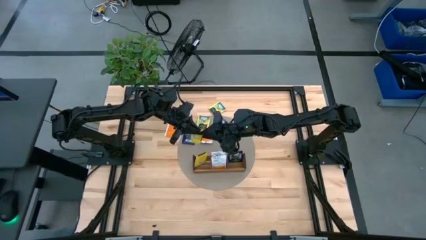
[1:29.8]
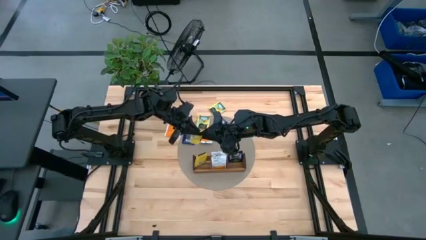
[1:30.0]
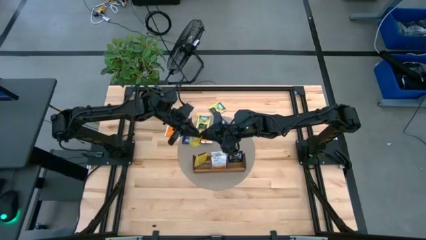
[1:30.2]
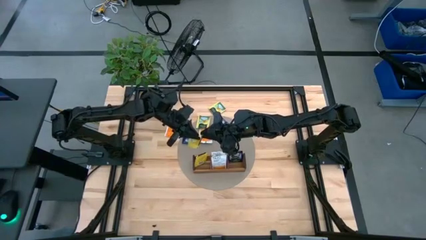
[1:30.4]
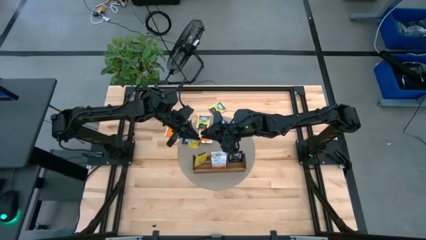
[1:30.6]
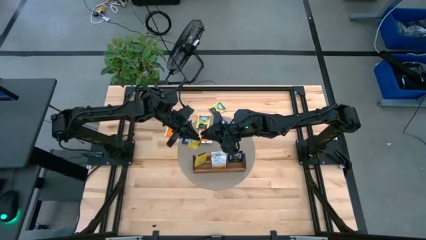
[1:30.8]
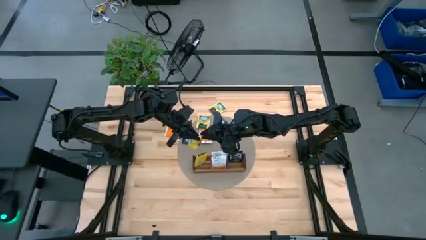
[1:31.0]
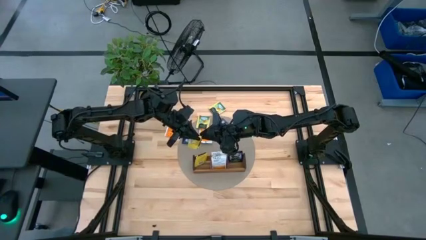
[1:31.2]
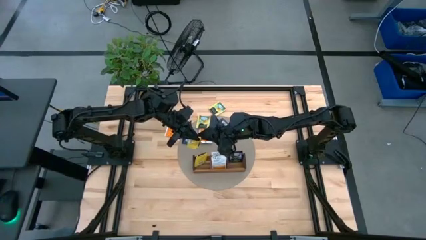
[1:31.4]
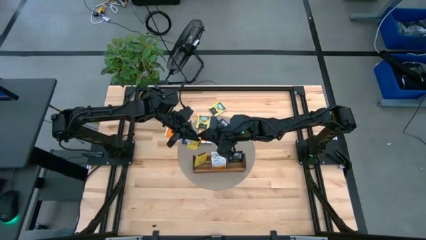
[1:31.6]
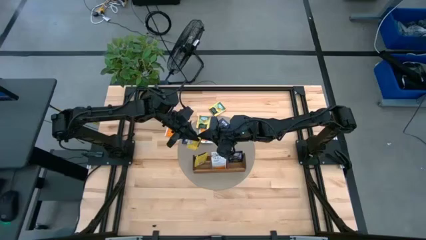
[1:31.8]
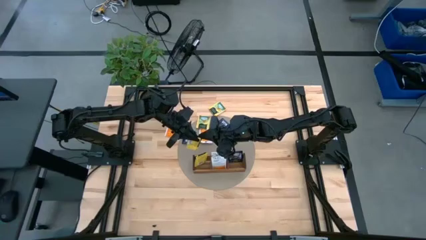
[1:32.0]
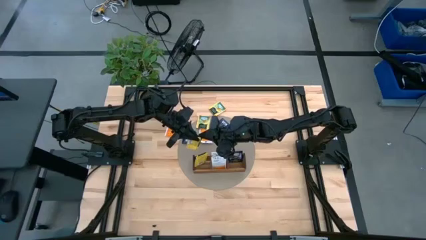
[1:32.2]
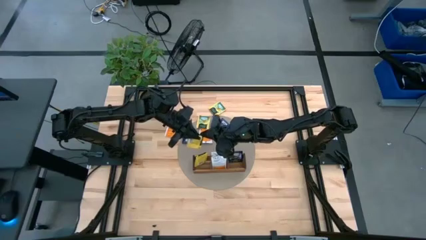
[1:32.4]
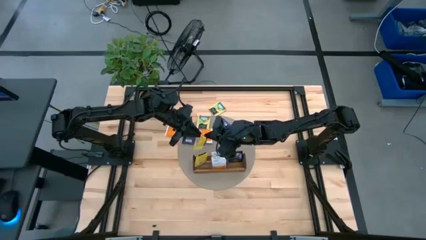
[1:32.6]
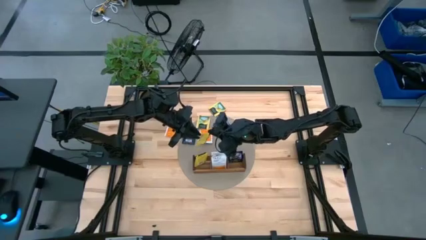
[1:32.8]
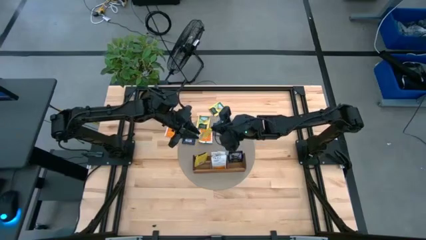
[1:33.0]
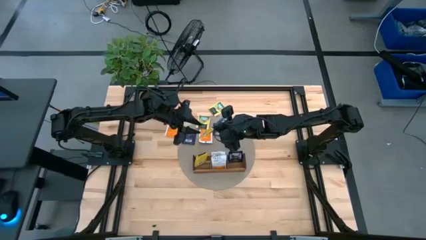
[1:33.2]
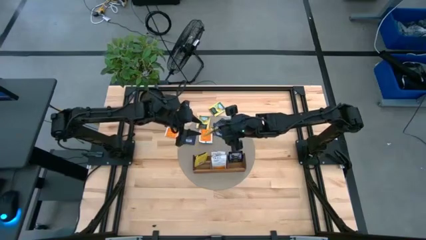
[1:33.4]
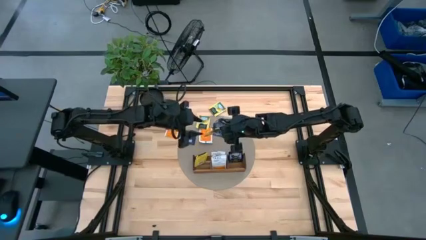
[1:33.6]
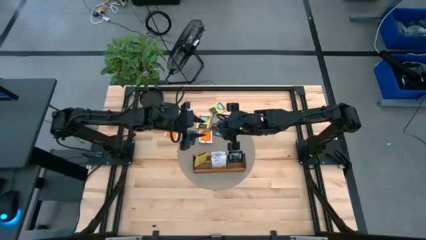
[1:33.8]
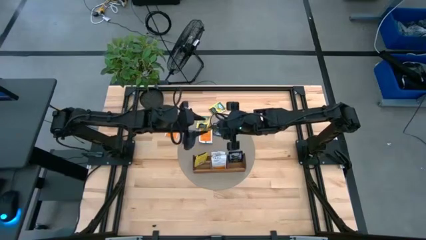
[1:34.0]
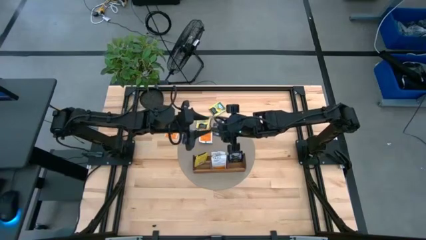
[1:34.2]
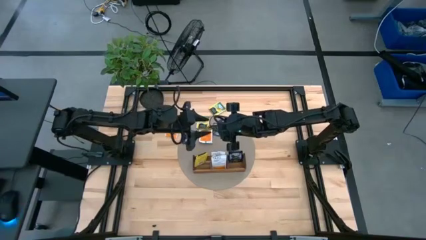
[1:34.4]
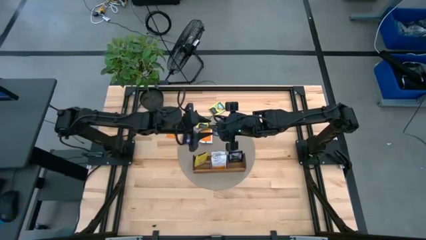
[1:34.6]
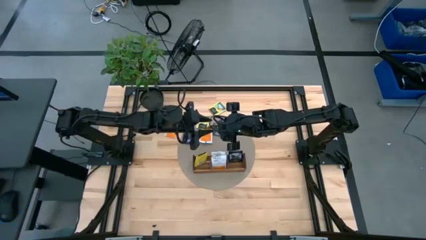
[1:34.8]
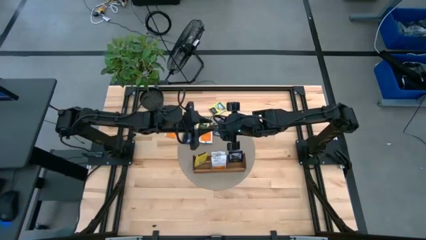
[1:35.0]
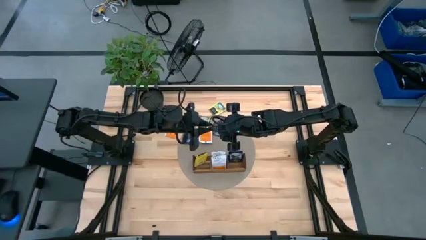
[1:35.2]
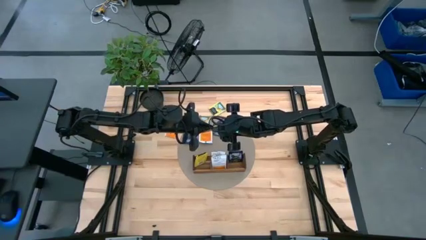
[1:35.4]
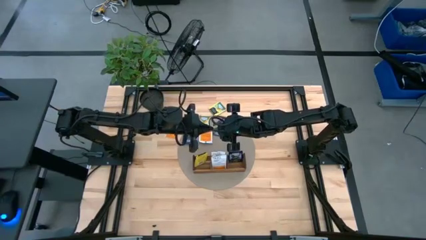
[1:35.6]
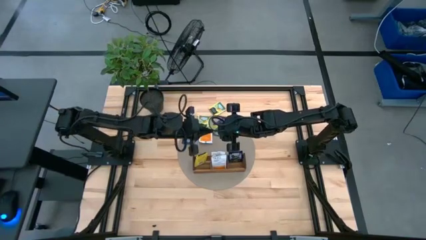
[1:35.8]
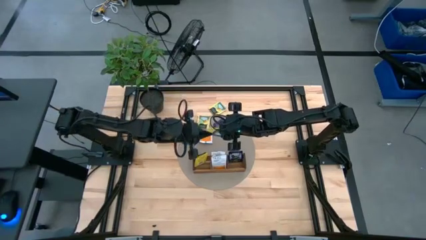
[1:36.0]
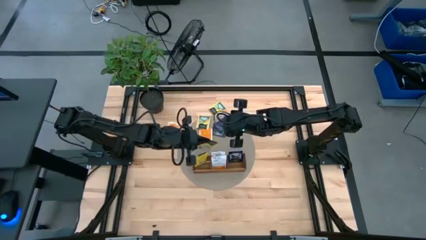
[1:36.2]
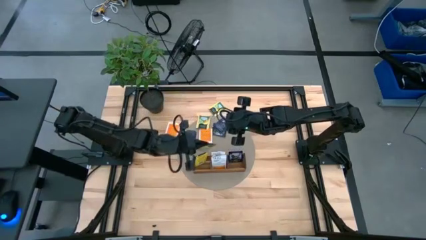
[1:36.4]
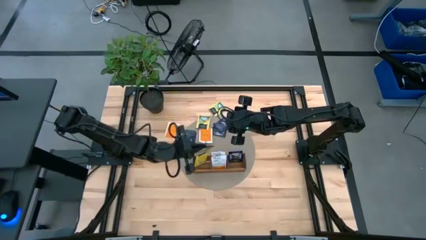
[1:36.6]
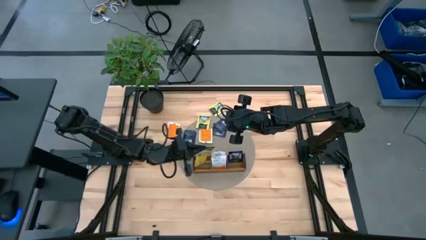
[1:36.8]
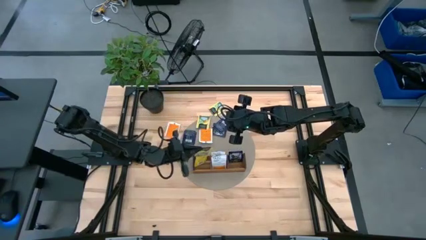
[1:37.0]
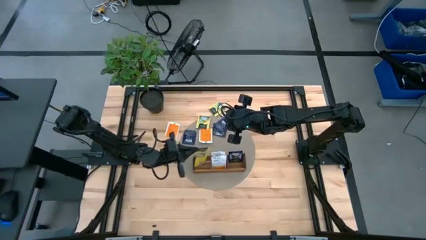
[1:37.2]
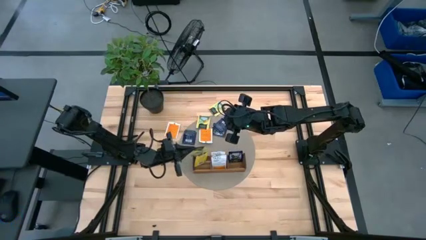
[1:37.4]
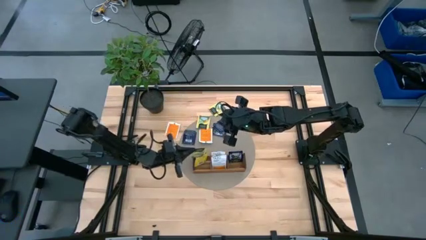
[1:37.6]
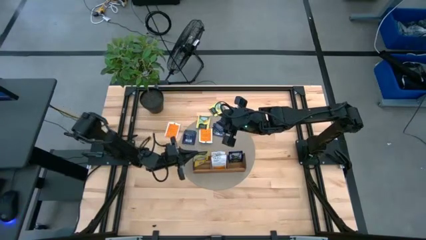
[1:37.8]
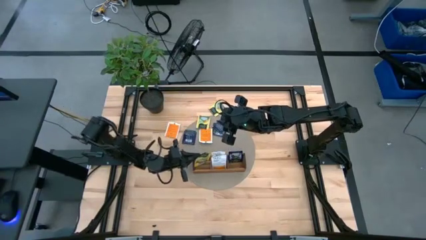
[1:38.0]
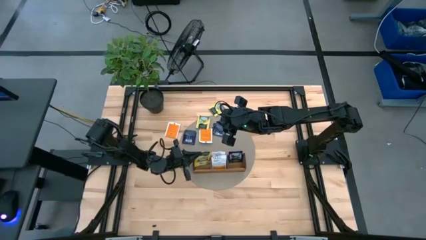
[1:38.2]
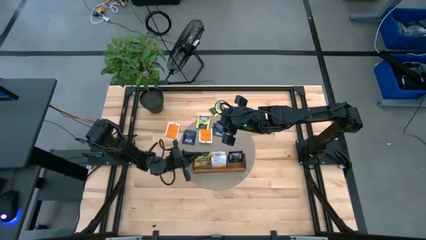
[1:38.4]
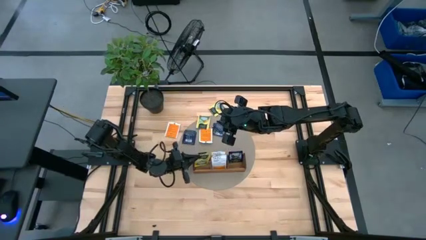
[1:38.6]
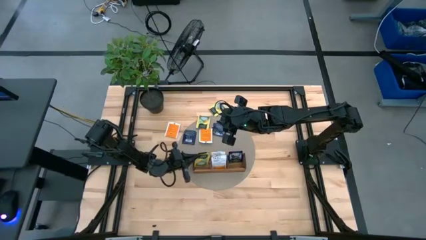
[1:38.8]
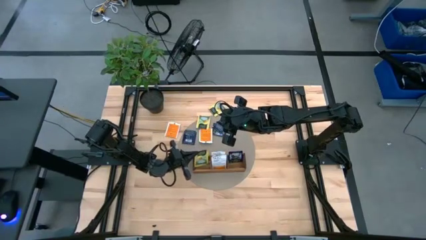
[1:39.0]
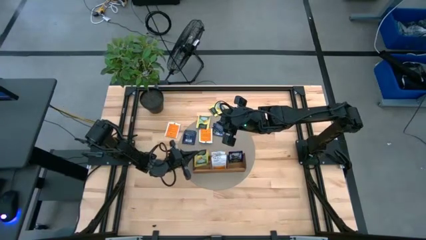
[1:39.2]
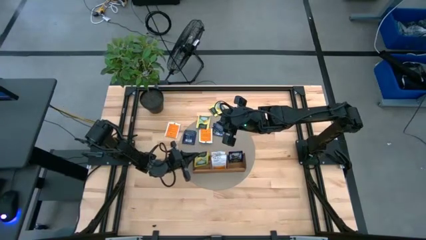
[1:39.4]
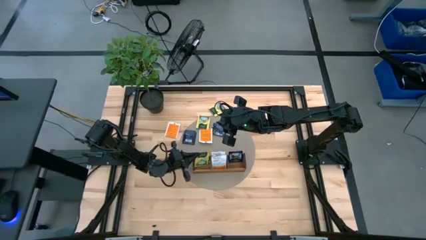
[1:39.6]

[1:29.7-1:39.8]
Task: Pick & Place Tea
Put the yellow tea bag into the left section of the wooden organizer

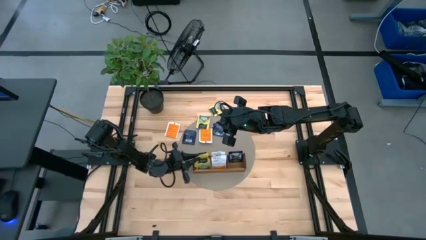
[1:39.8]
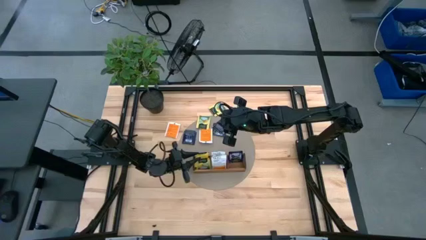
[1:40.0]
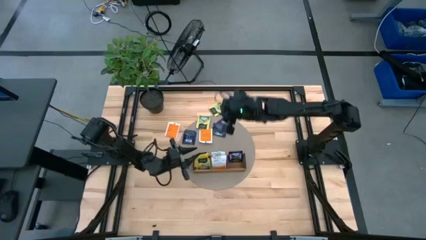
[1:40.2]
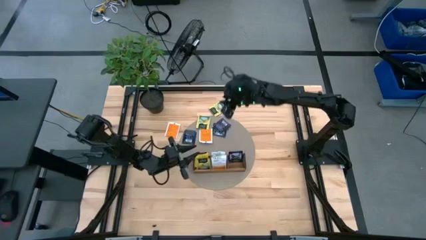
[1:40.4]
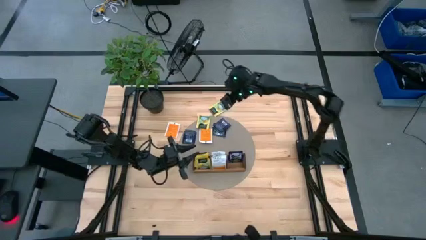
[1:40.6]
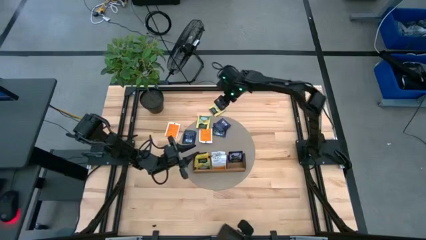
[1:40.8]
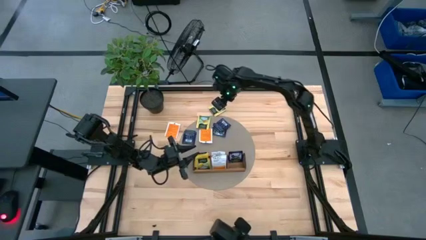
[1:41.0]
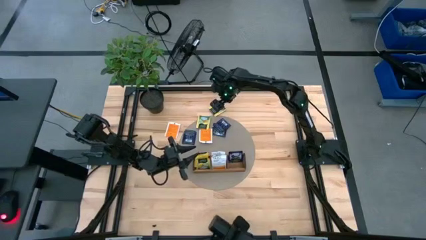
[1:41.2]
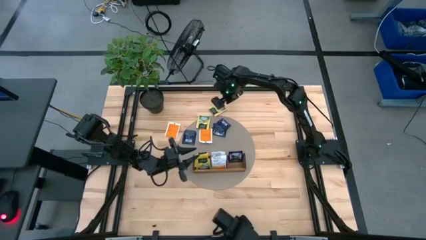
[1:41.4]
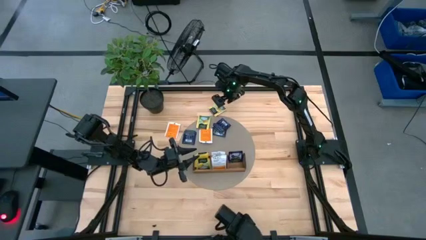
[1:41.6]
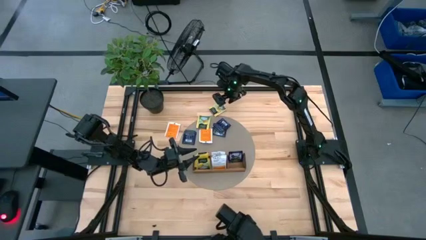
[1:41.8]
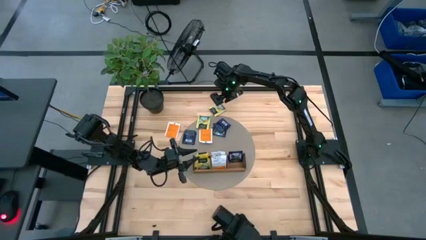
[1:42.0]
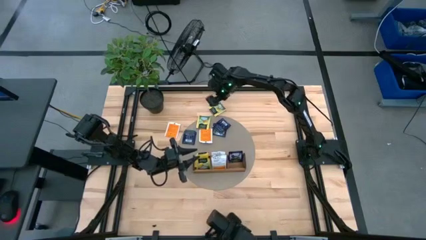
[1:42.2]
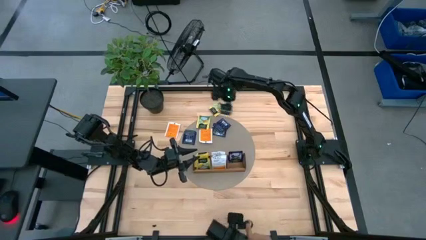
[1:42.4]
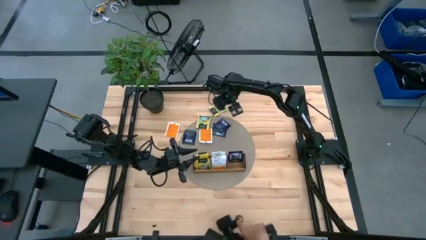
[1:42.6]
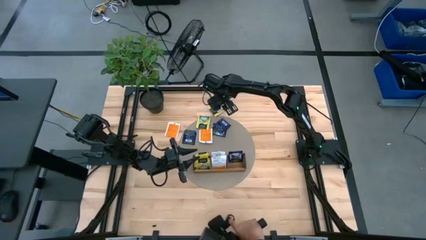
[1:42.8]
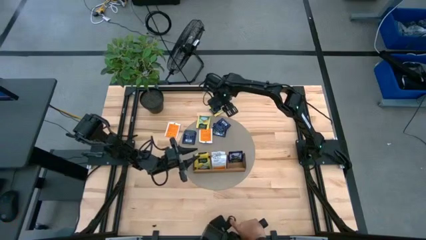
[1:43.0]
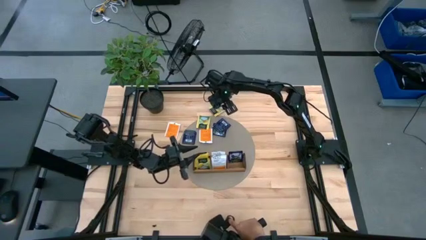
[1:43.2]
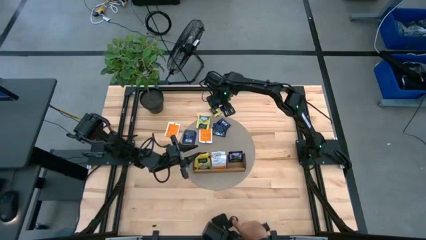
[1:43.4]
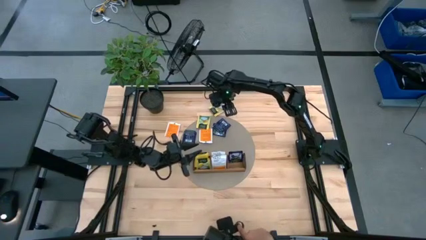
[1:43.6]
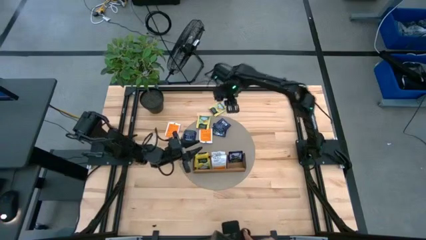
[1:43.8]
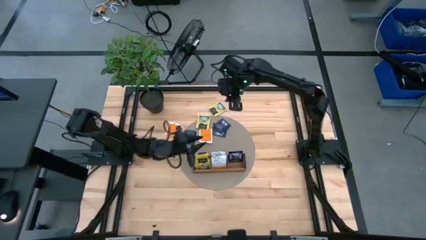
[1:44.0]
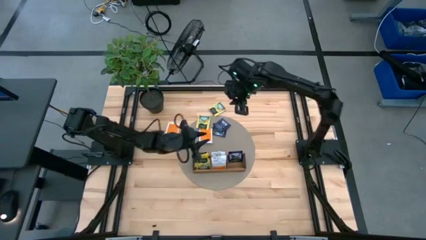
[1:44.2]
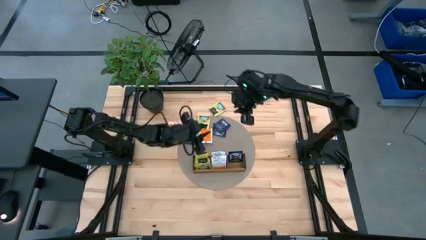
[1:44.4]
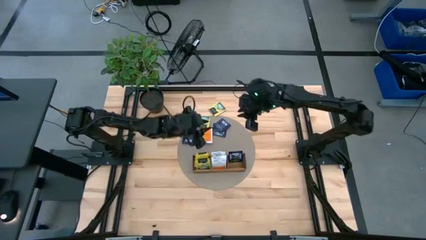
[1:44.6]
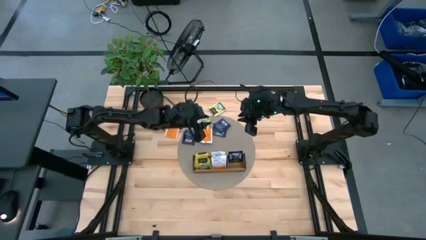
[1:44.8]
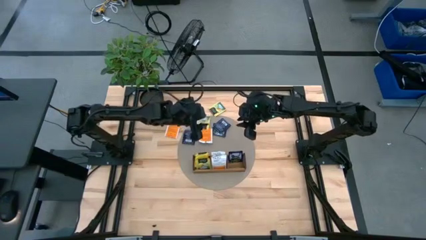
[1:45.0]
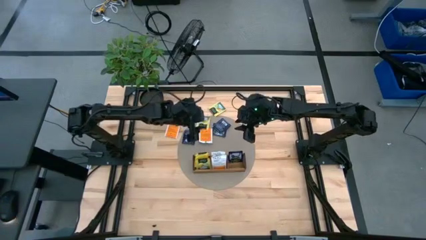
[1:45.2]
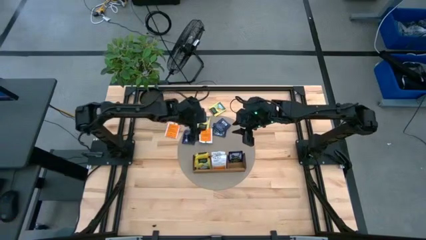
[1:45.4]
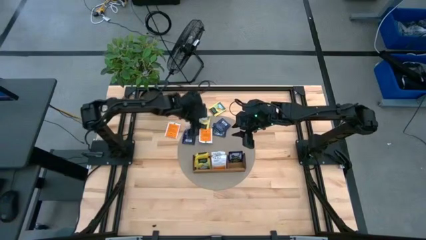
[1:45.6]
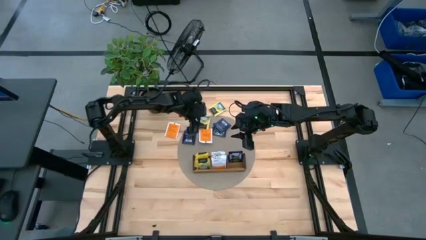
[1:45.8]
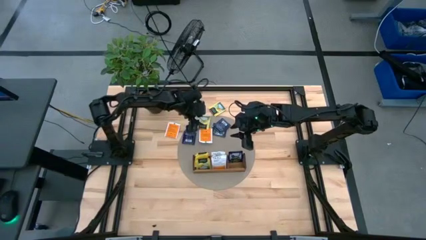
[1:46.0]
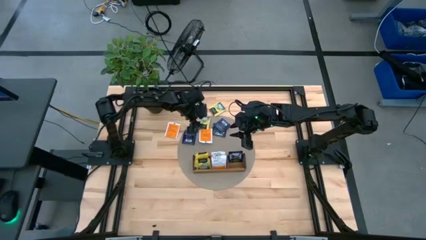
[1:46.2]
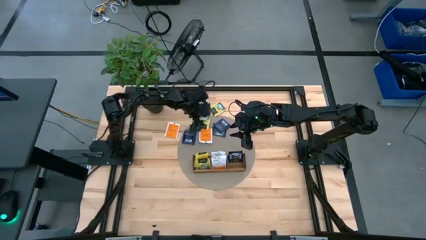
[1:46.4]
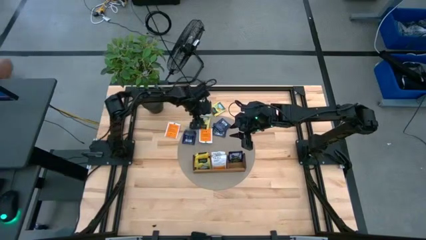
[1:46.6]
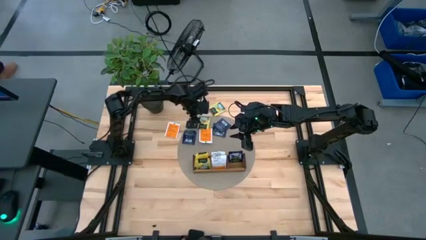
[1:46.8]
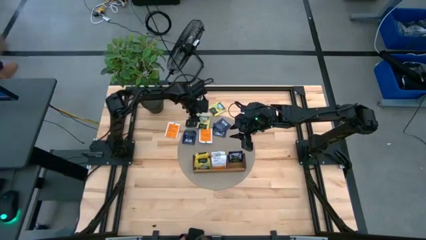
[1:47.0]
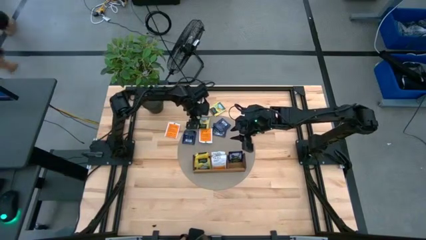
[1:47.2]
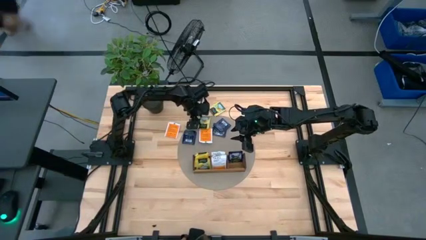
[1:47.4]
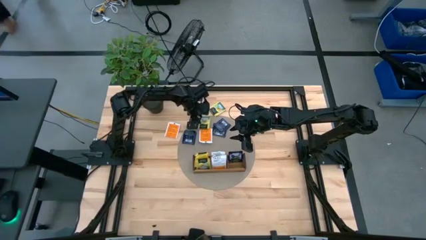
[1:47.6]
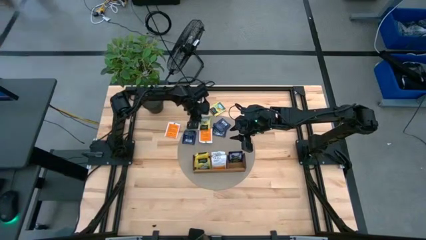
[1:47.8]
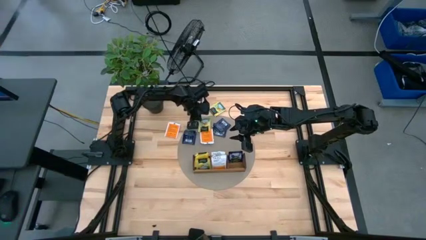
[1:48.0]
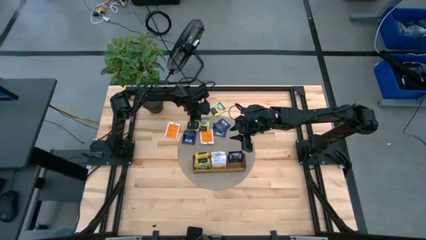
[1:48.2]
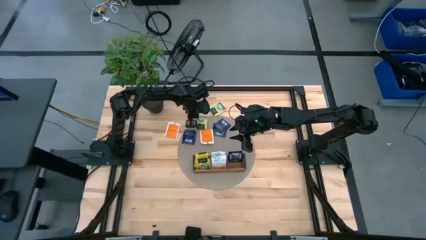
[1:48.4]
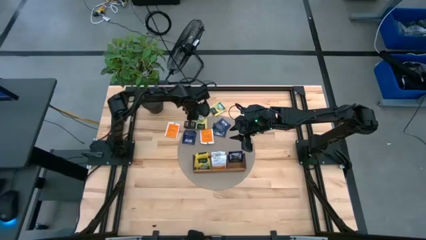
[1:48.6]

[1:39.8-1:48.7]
Put the yellow tea bag into the left section of the wooden organizer
